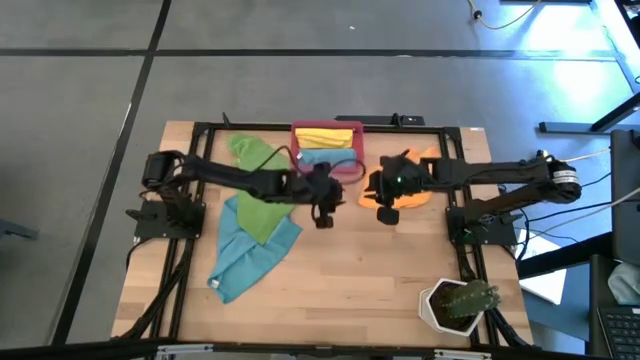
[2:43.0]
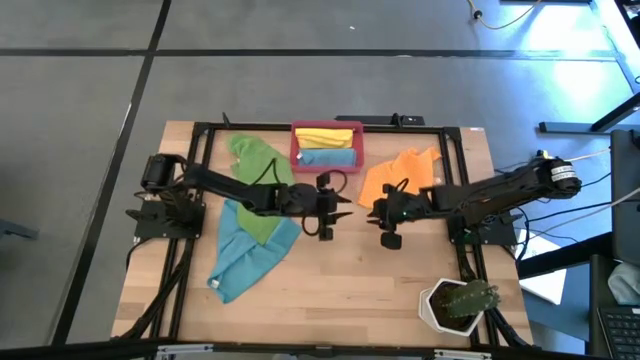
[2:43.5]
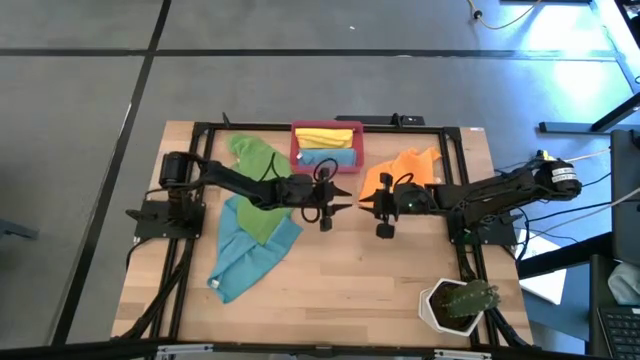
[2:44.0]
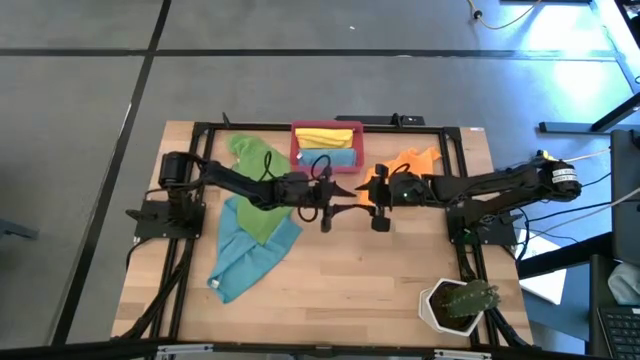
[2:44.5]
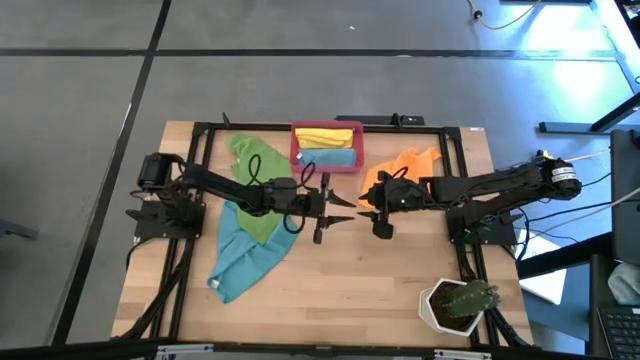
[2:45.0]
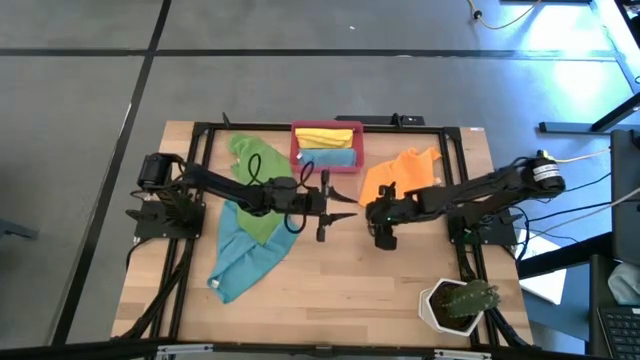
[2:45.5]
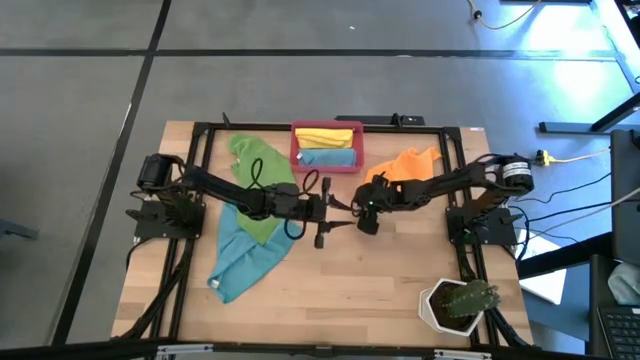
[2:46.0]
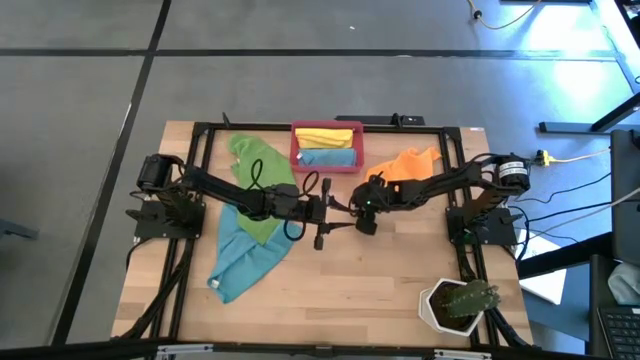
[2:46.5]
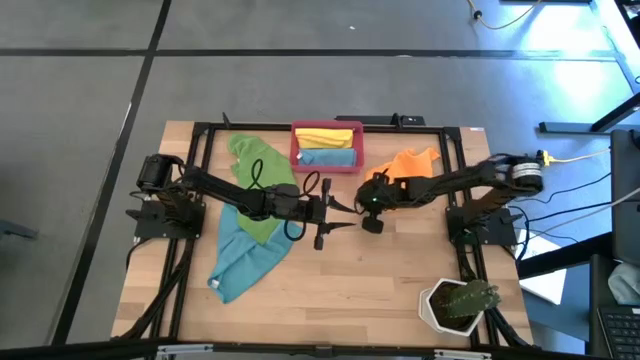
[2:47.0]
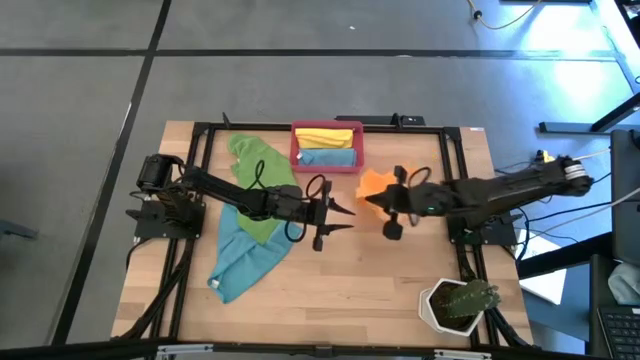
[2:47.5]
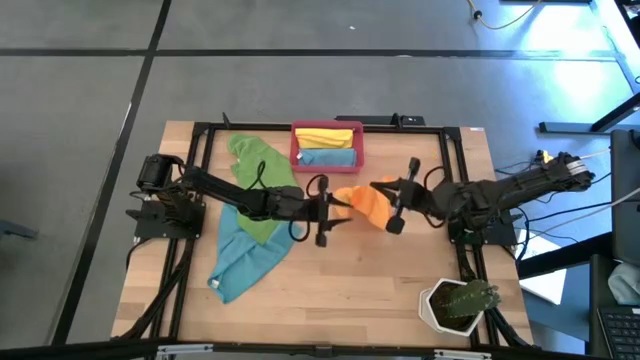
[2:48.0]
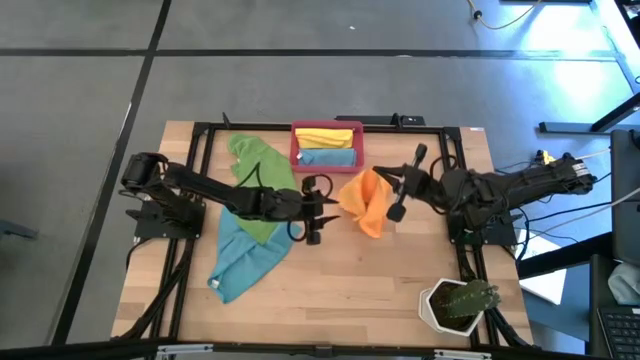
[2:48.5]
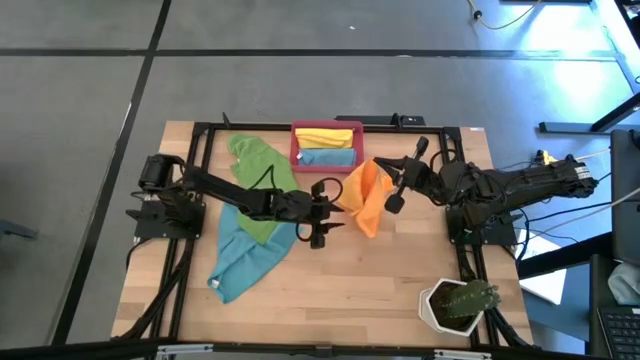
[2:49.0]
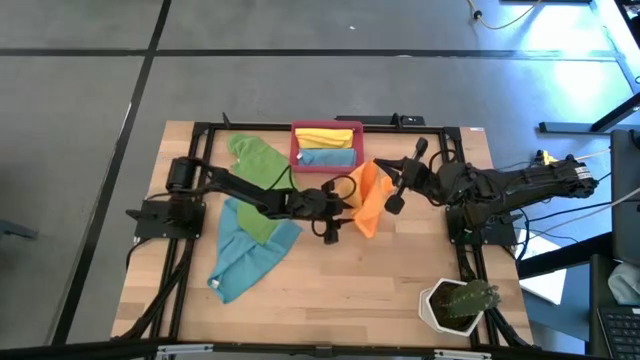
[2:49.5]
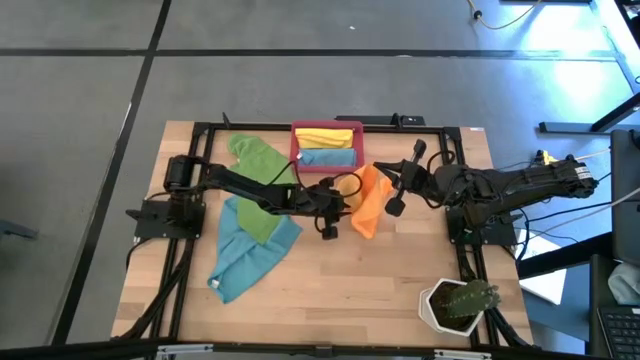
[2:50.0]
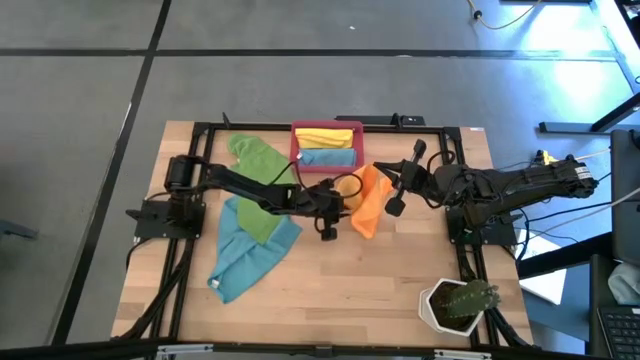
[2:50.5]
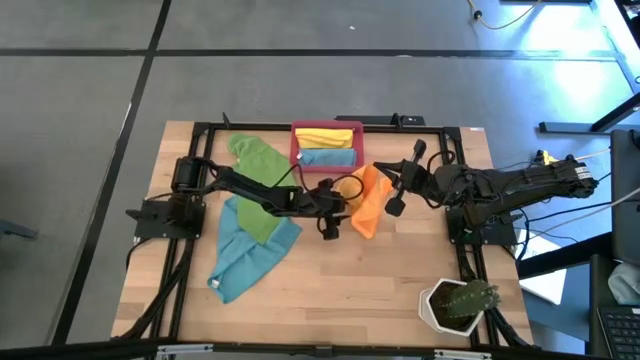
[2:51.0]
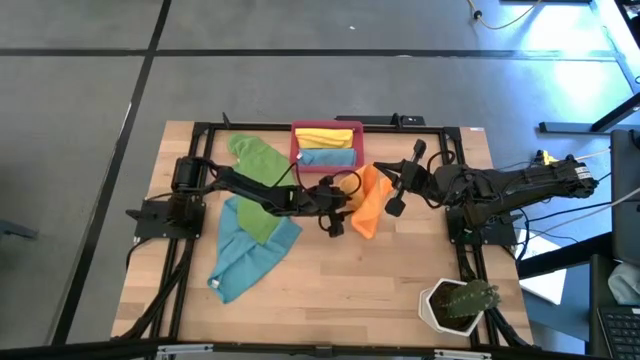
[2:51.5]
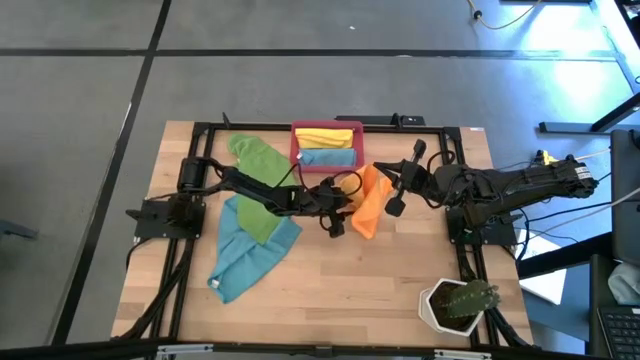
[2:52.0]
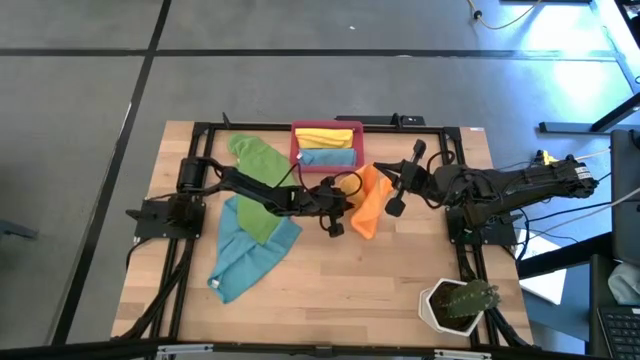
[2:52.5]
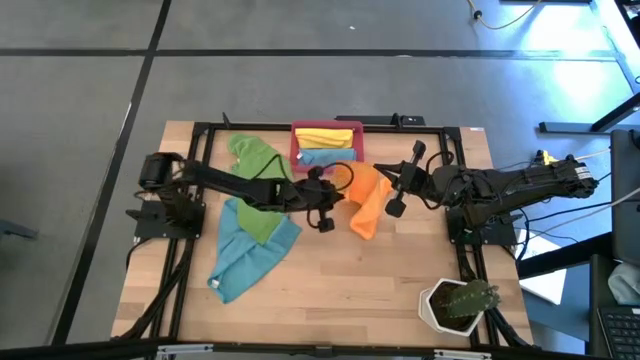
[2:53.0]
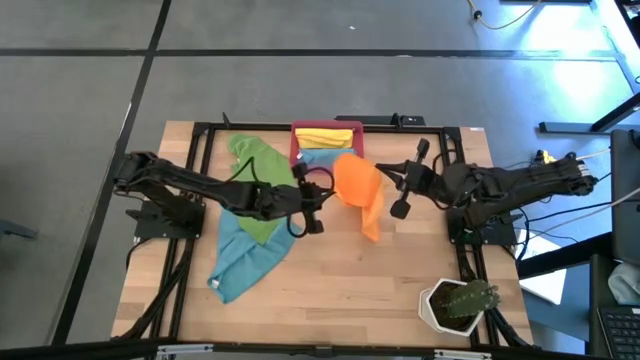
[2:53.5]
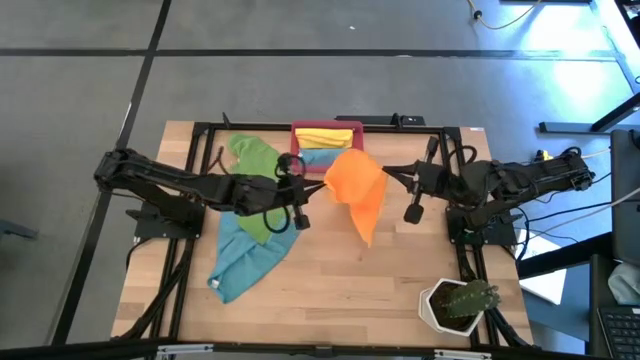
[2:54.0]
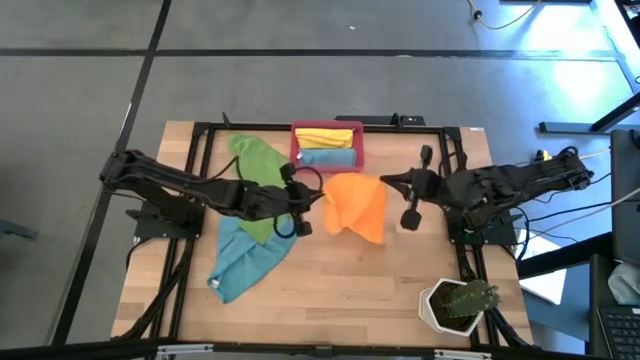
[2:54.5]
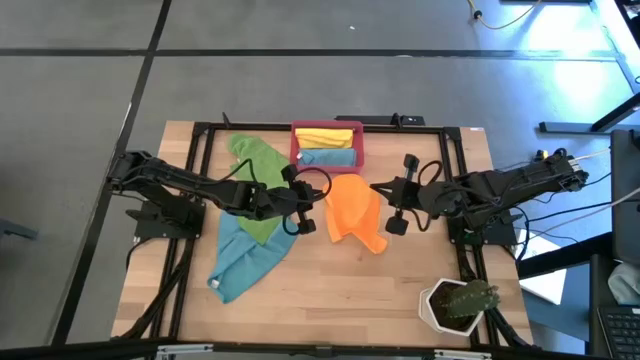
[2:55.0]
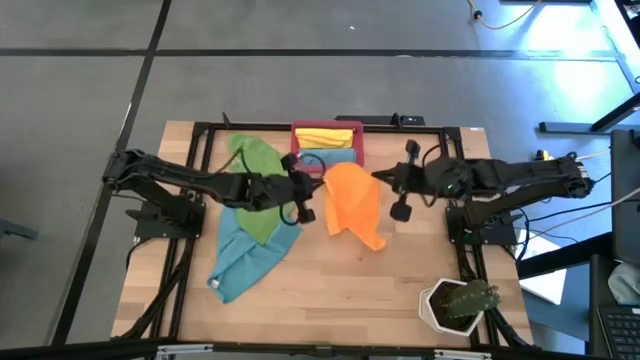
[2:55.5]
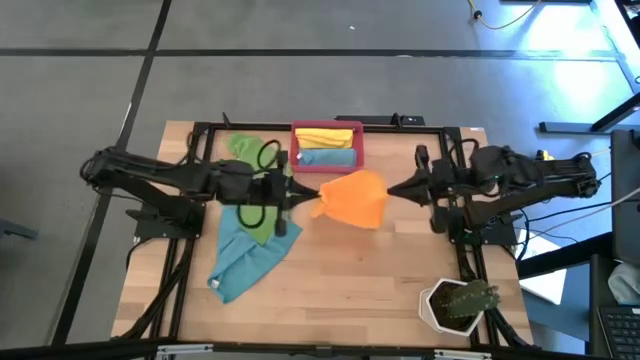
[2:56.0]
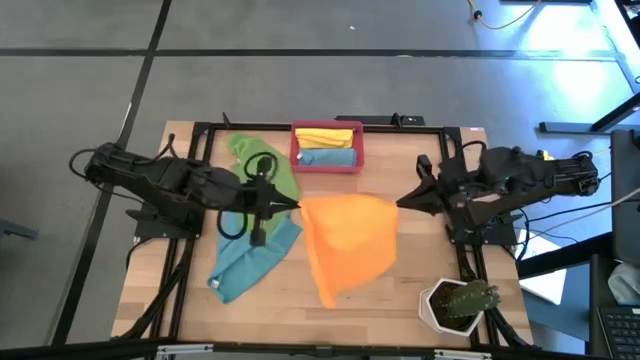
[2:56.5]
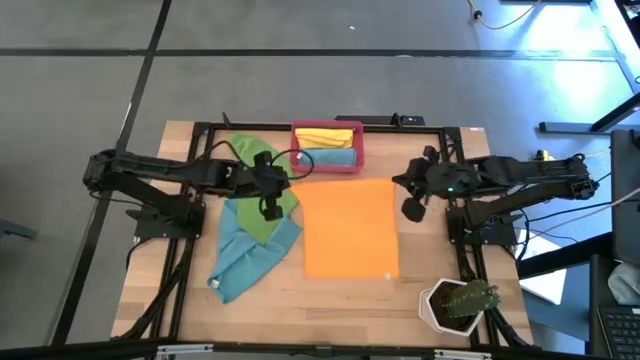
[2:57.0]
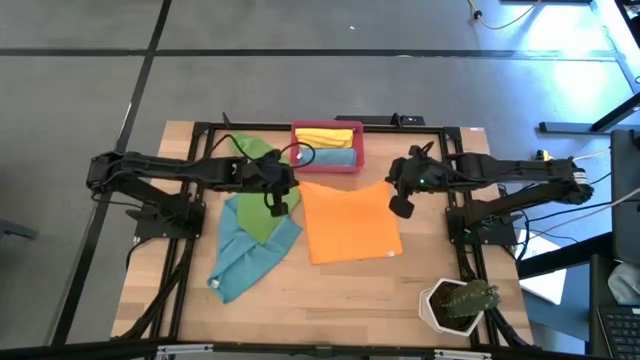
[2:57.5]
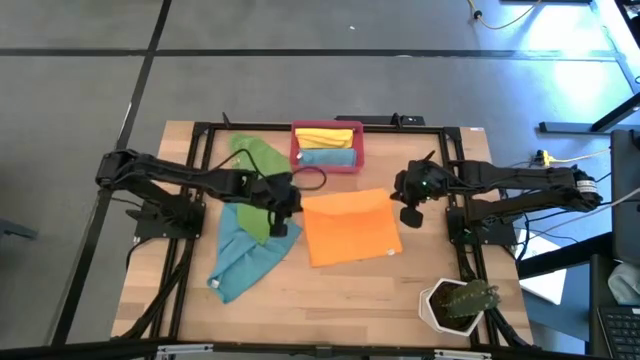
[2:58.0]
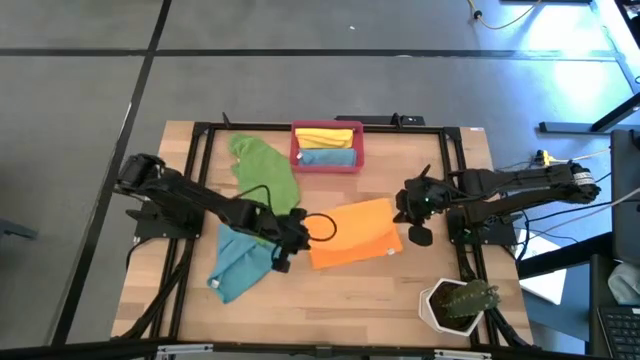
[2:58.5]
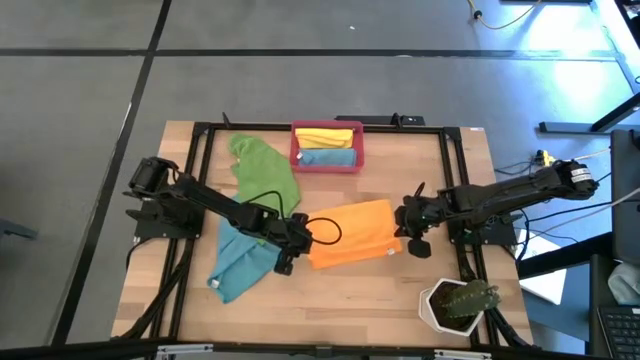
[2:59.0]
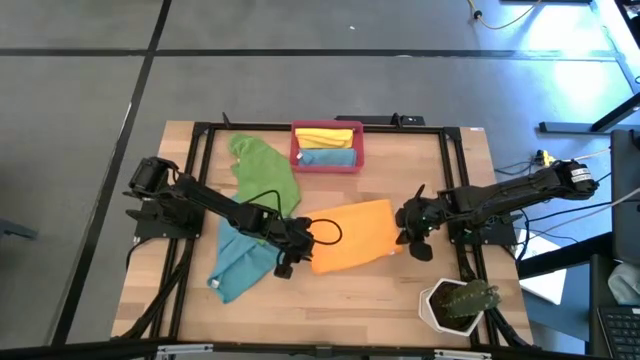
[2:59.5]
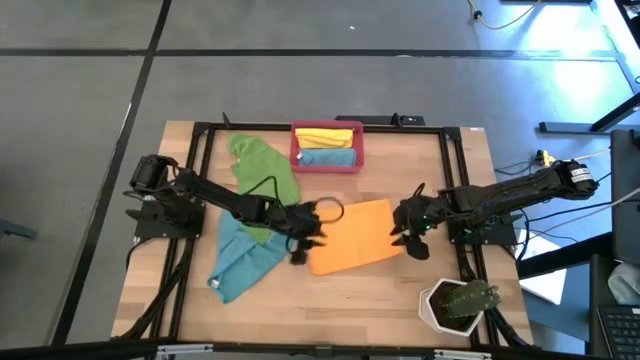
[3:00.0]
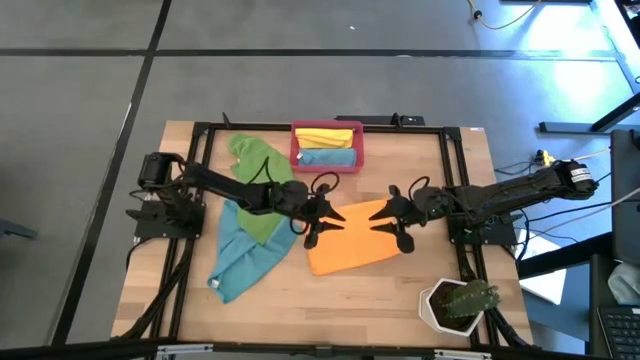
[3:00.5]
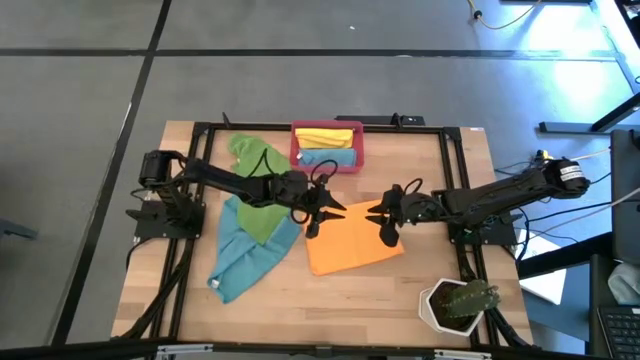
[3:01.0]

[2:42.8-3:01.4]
Task: Roll microfiber towels into tight, uniform cylinder then place into a basket
Fold the orange microfiber towel

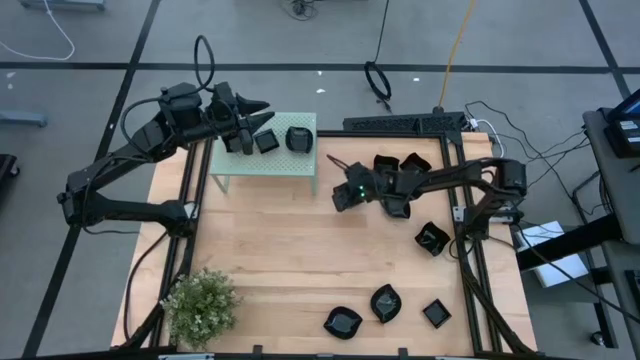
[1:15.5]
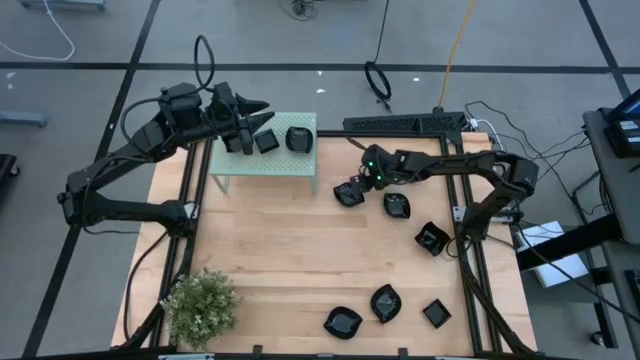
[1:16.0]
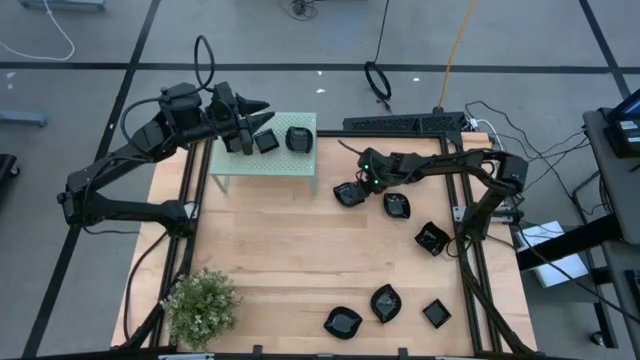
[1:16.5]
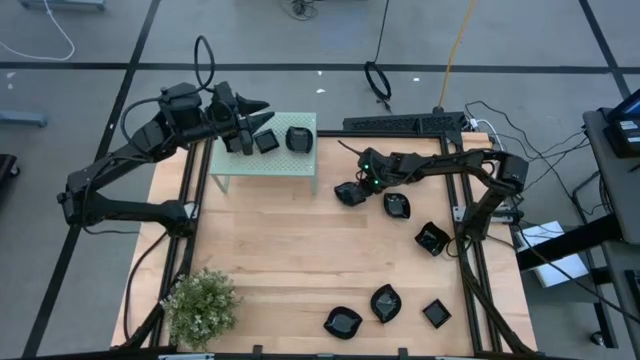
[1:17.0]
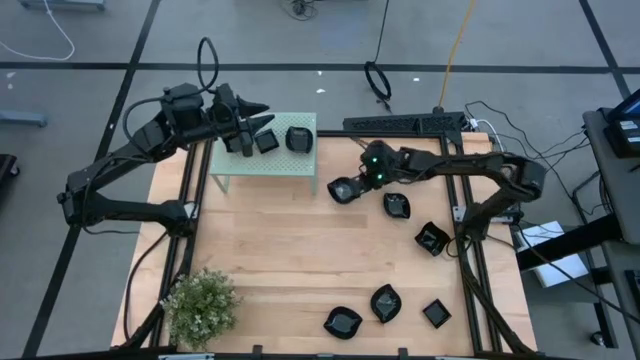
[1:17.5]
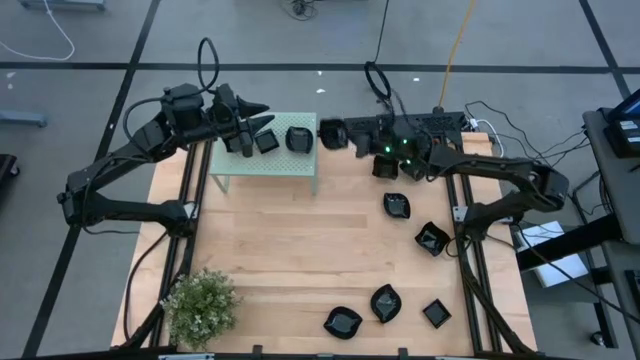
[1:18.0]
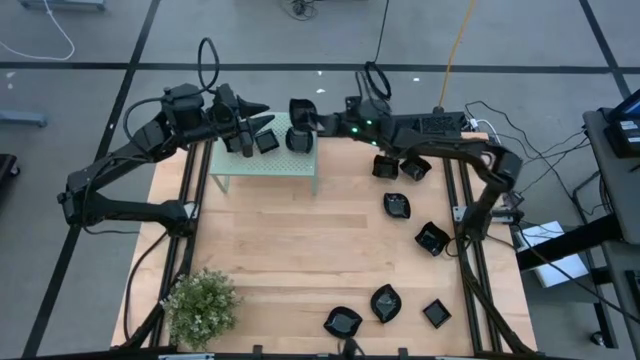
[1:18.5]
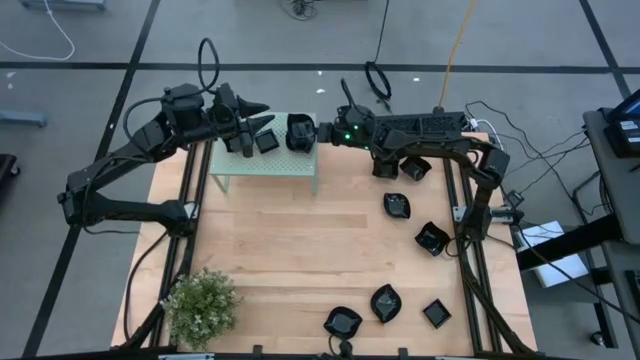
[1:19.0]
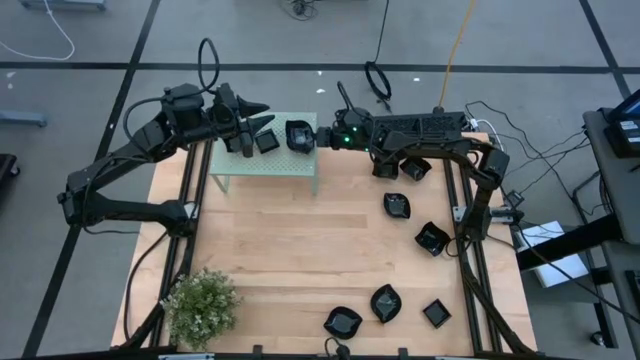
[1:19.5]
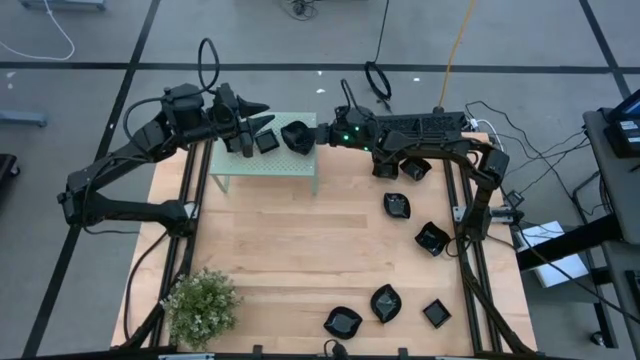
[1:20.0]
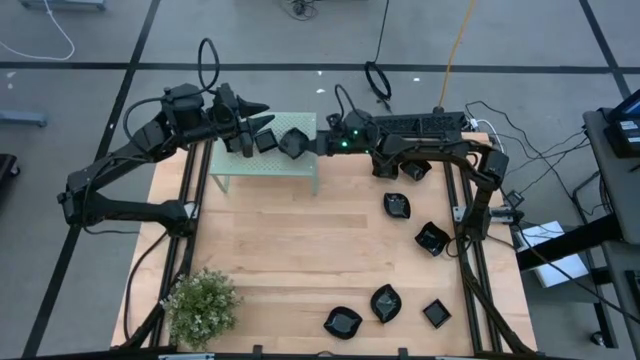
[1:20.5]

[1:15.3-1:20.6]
Task: Pick & Place Mini shaped plates
Stack the leaf shaped plate on top of the leaf shaped plate on the shelf
